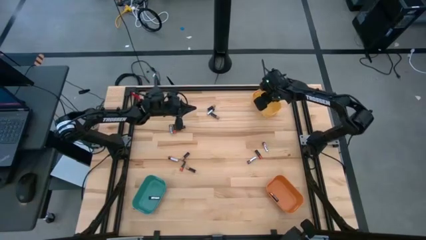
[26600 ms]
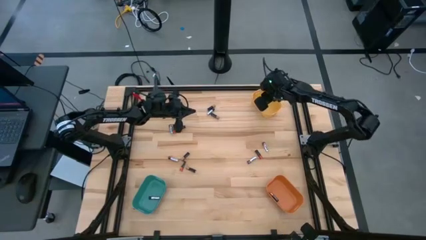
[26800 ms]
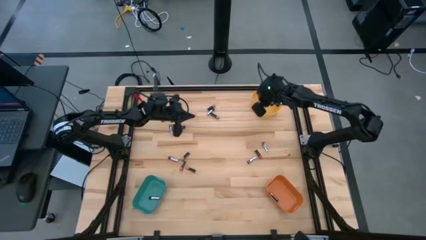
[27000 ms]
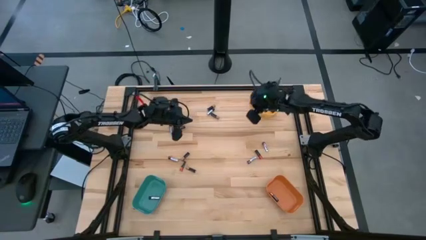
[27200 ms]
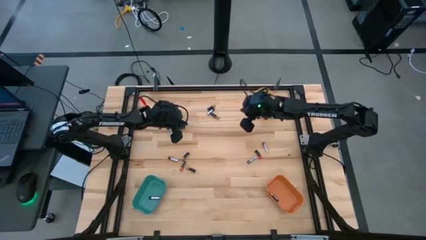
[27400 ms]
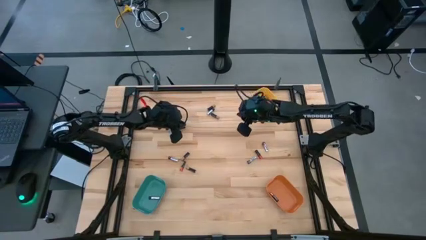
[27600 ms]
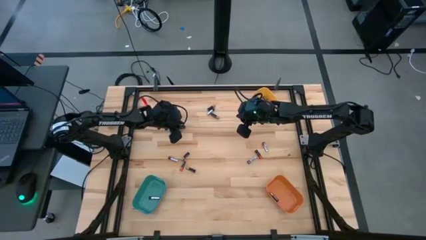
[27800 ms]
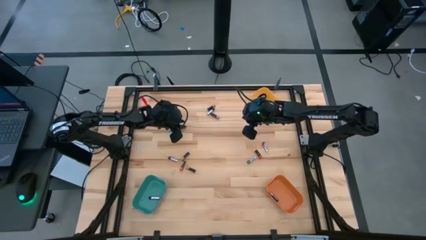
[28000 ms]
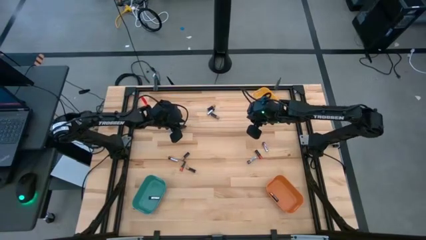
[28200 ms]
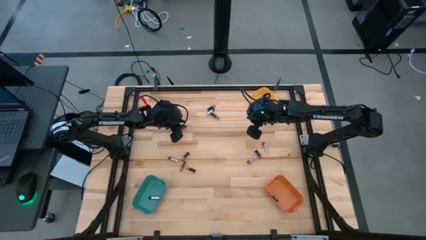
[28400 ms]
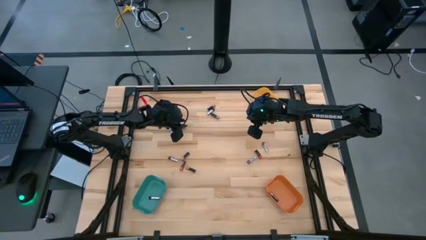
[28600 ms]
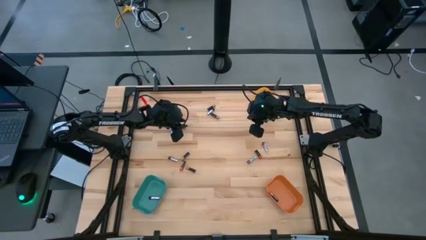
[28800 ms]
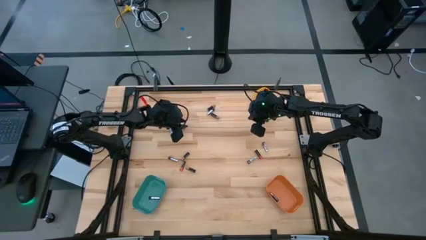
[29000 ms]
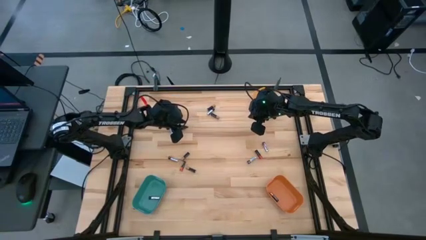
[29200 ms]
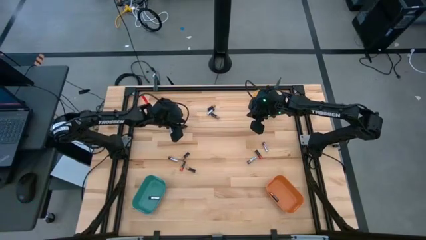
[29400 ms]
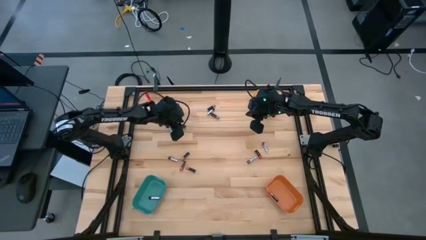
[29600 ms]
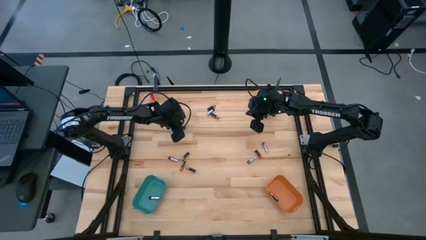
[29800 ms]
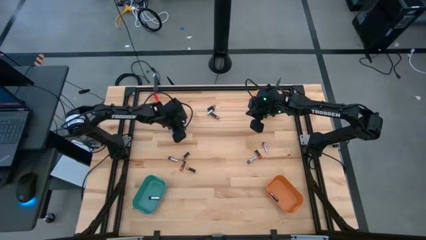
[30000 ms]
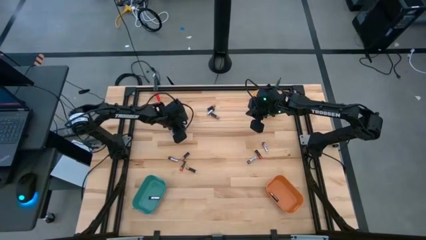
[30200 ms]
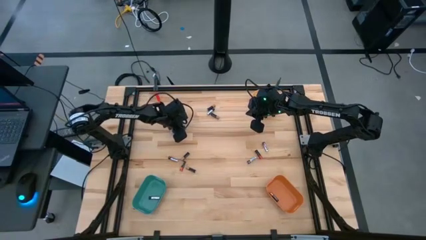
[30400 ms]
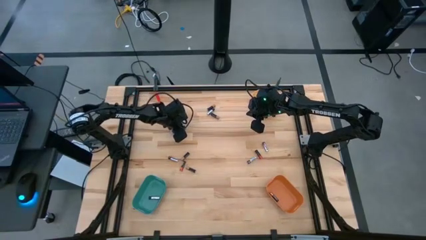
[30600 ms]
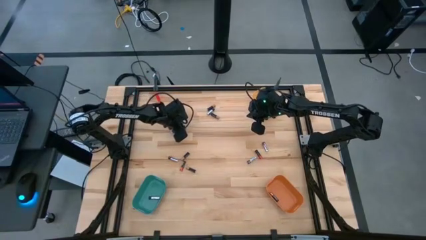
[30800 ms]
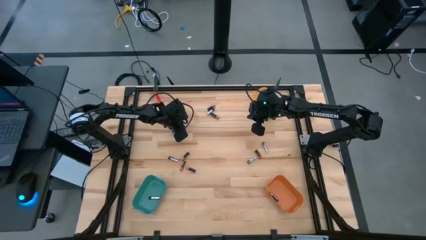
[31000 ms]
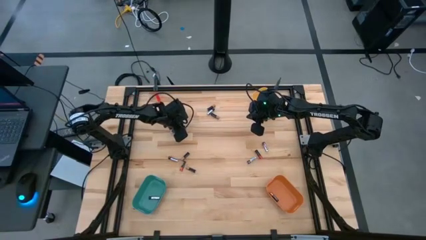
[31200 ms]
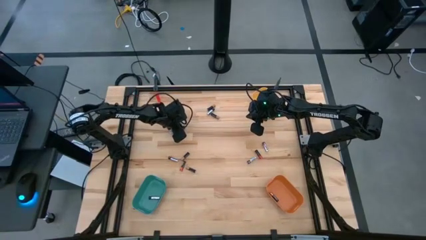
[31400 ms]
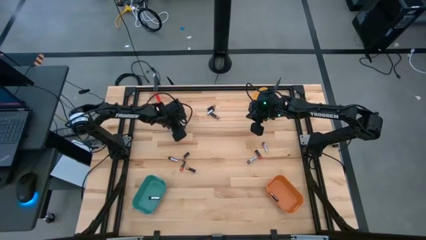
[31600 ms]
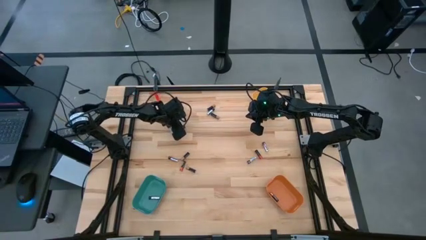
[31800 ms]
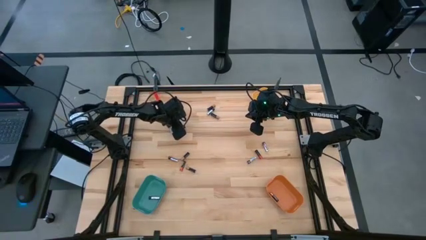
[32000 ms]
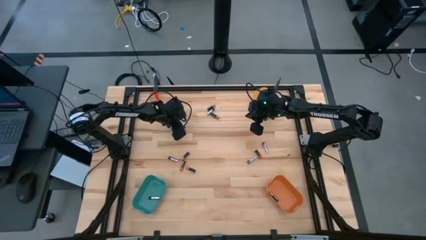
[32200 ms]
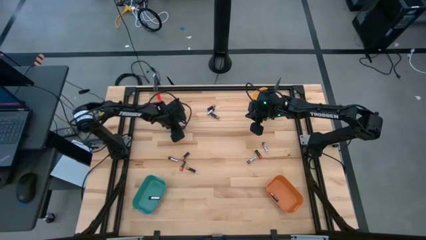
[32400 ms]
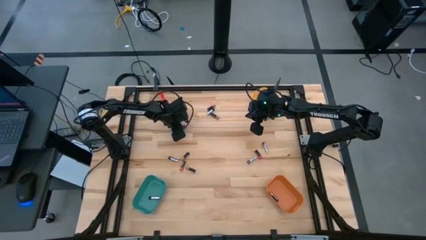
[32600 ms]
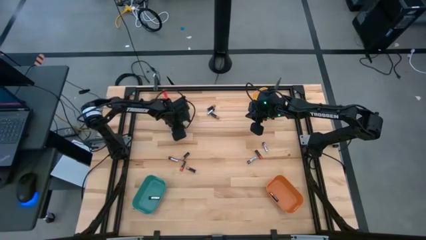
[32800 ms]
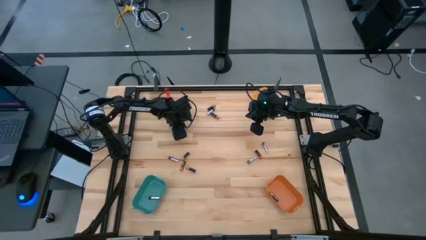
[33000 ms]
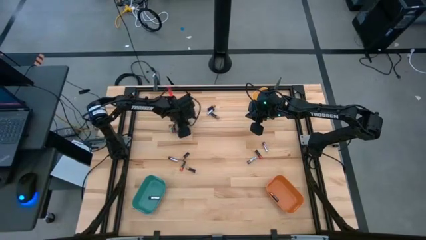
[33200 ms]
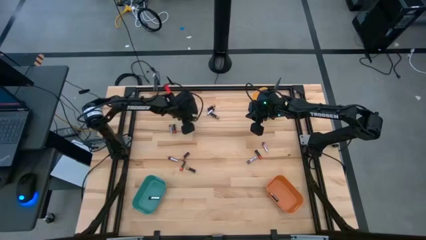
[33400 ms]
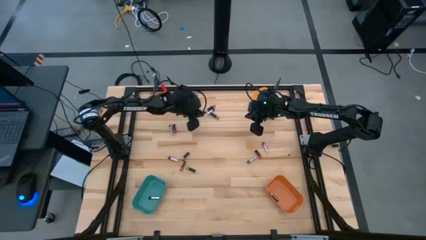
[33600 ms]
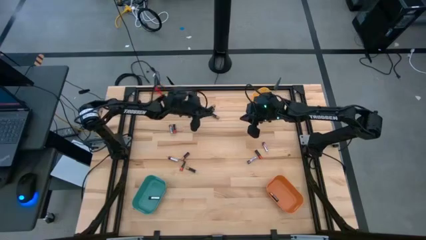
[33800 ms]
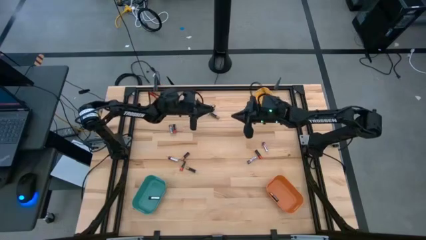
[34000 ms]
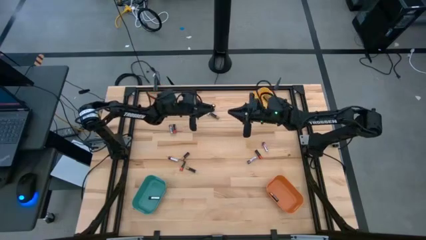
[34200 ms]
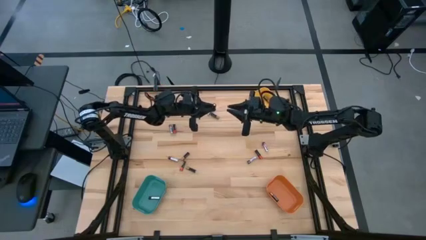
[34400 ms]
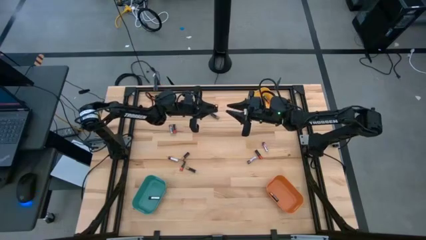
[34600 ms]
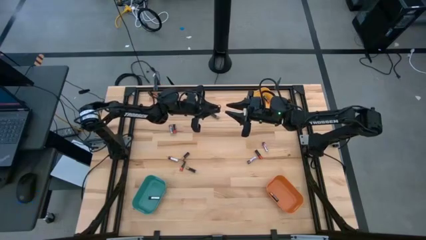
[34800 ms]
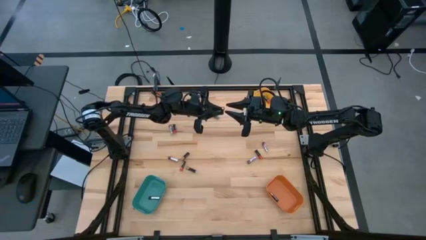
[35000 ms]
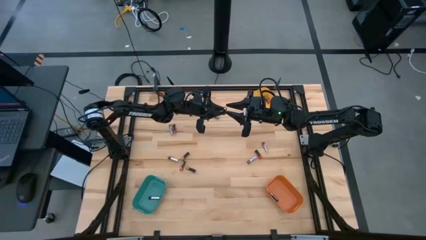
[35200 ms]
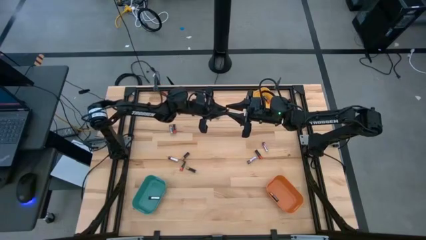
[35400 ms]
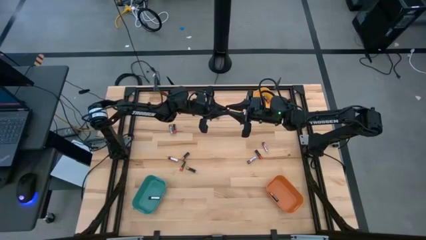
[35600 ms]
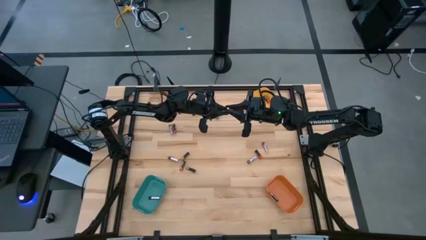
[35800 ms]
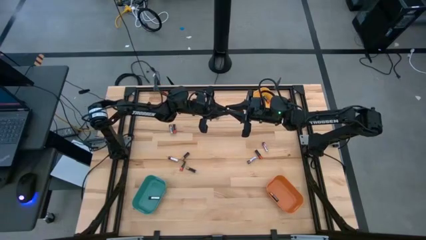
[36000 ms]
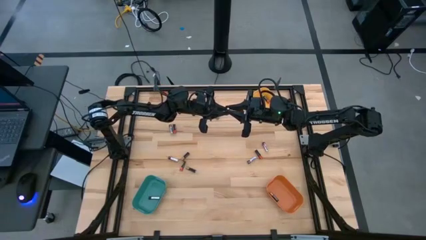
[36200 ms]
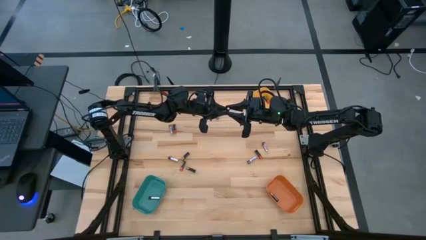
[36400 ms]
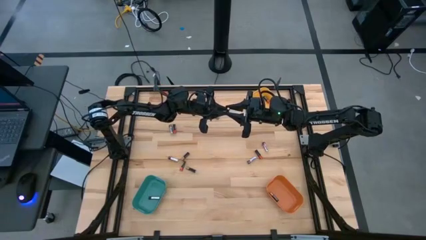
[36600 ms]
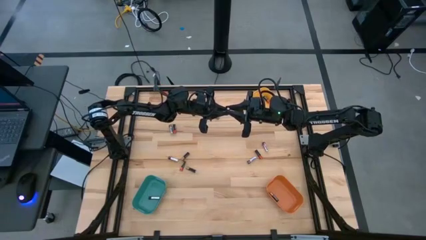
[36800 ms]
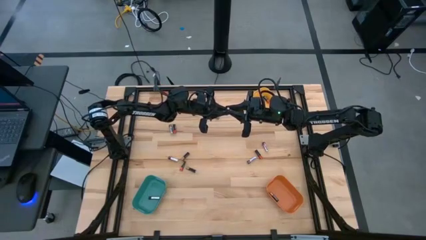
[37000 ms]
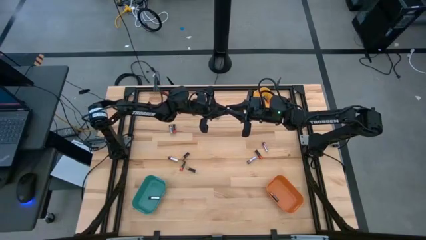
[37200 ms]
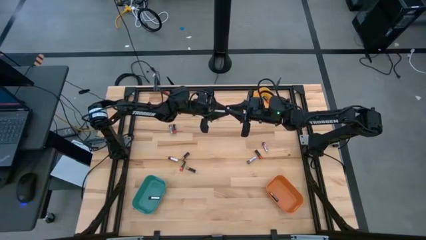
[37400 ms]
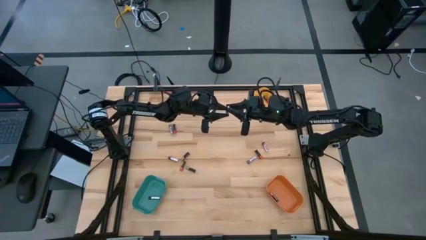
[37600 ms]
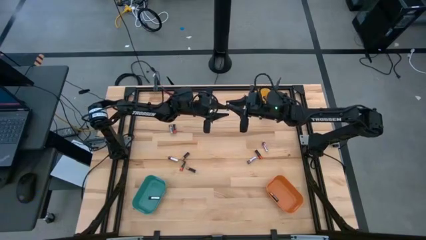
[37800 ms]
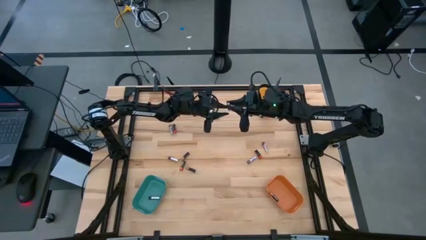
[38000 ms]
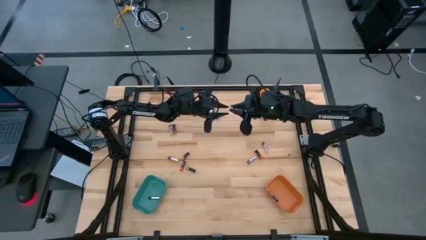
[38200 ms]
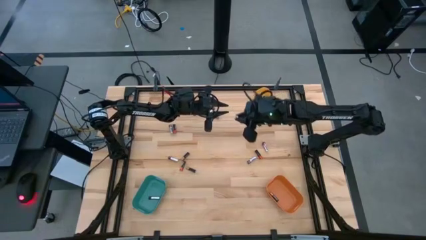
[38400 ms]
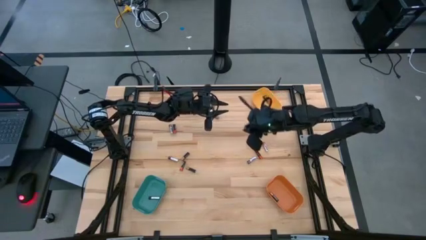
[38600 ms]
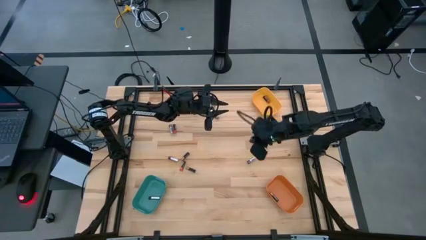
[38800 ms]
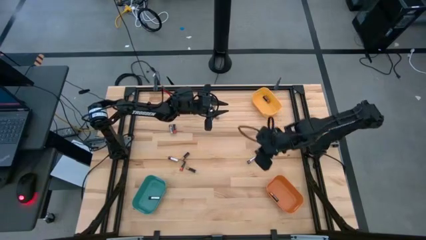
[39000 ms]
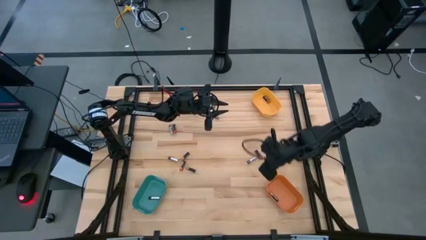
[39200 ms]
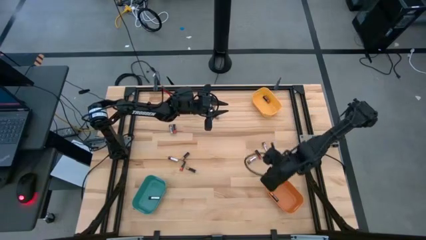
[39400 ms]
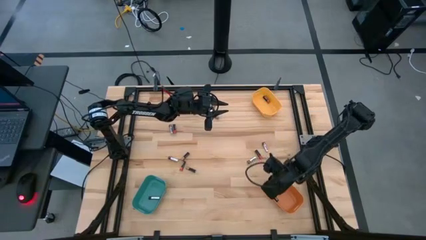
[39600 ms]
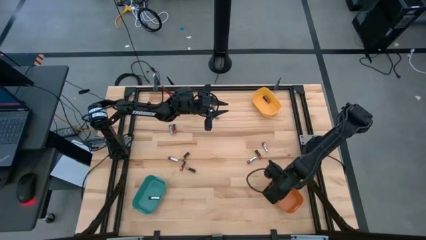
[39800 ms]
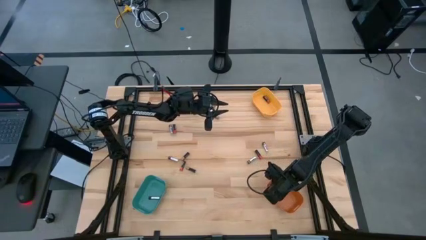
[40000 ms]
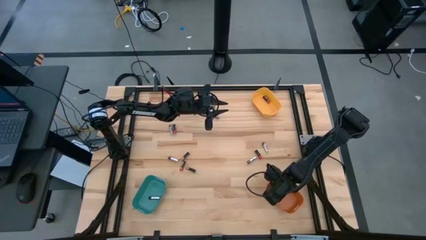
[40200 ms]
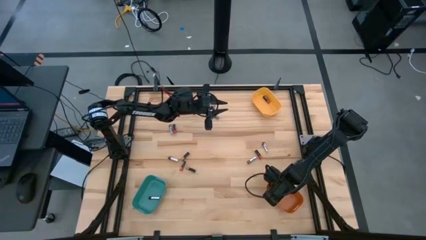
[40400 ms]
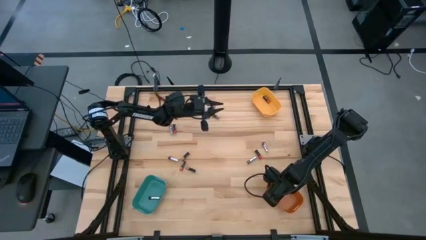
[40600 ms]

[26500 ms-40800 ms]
Task: Sort batteries
Put the brown battery into the orange bin

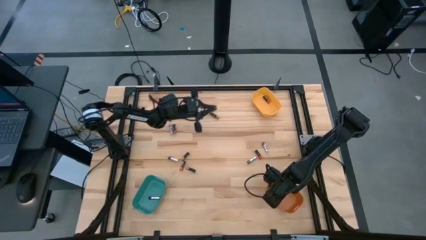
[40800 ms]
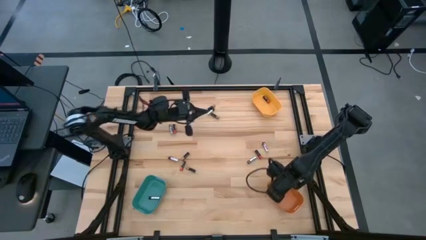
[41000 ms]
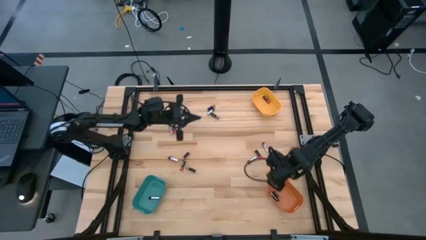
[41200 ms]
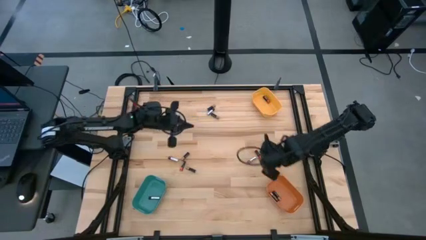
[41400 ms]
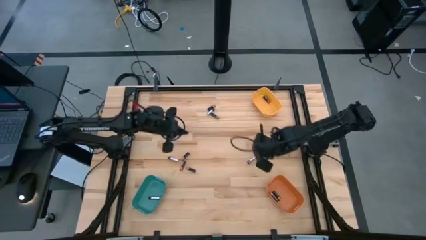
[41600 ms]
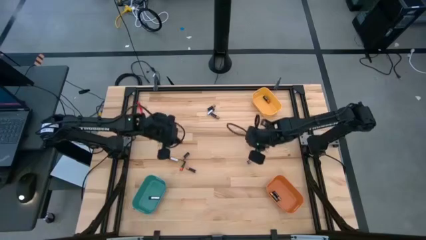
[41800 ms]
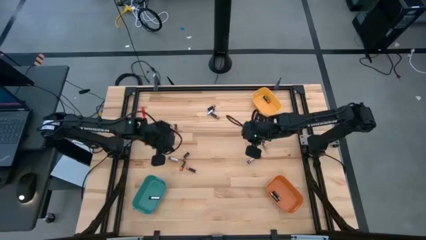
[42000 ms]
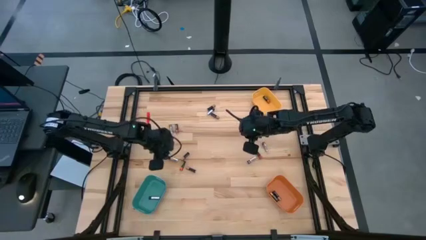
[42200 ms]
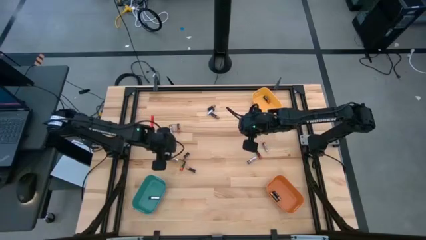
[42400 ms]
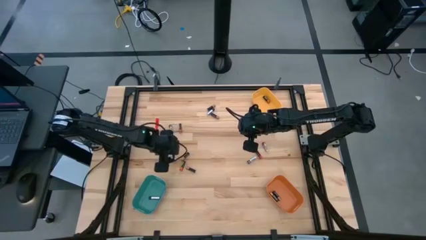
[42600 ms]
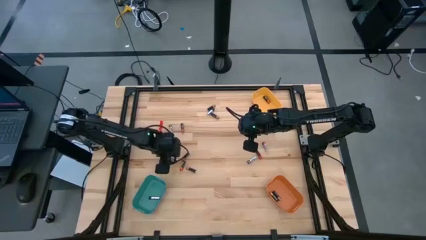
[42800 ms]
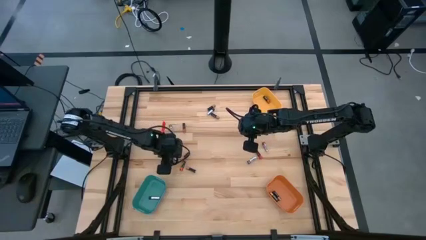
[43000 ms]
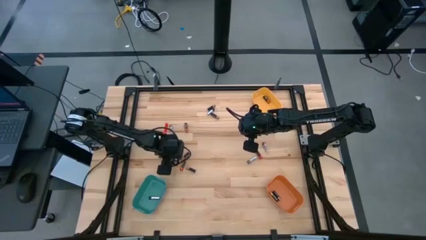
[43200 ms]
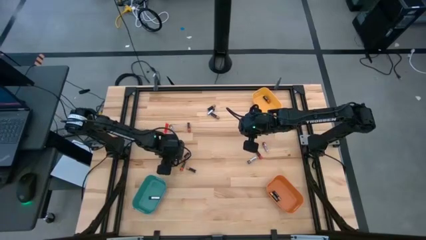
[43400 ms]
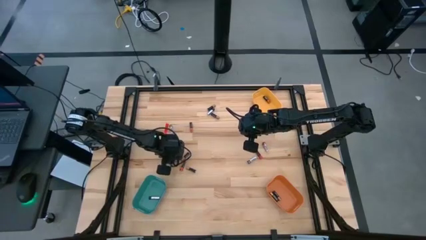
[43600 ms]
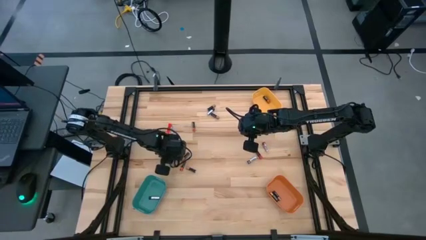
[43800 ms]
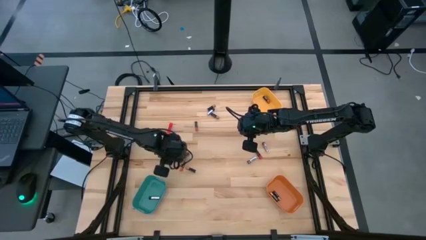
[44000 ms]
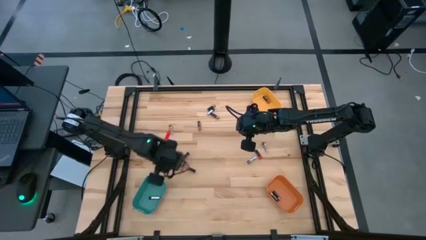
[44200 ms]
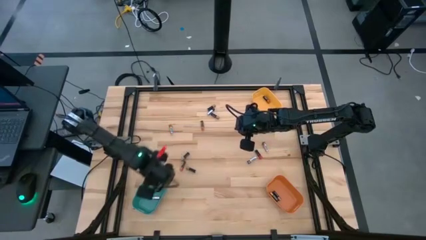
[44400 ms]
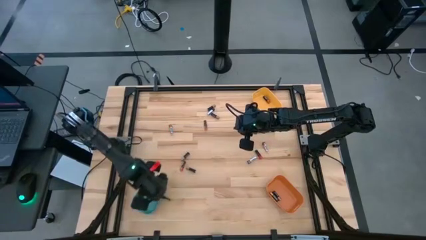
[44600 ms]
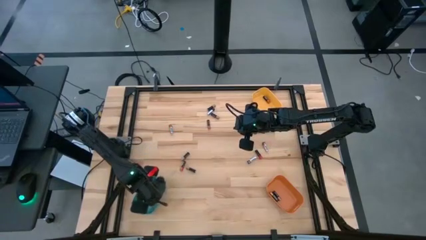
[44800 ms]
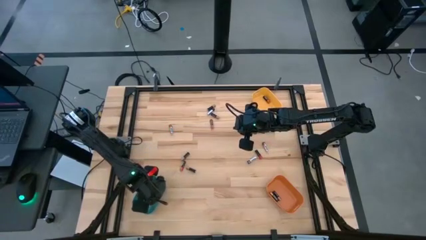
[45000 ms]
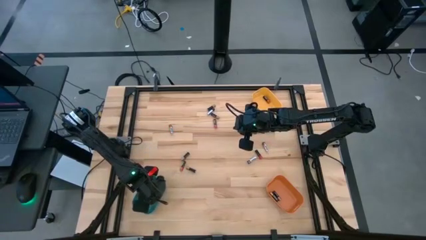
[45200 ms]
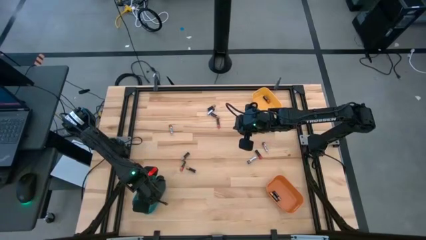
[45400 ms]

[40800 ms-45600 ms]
Put the silver battery into the green bin
